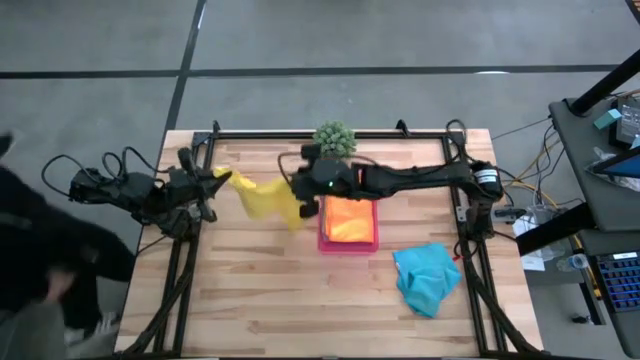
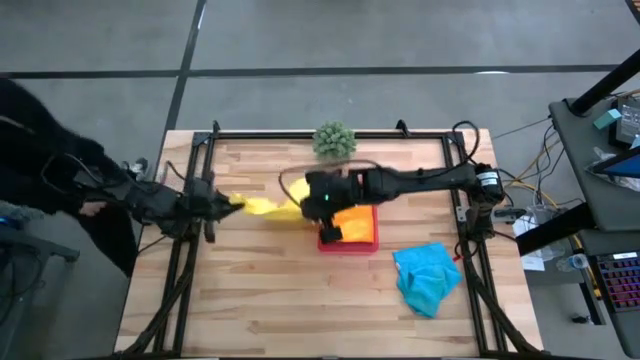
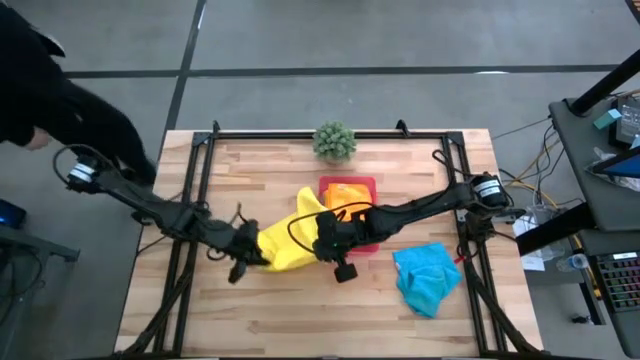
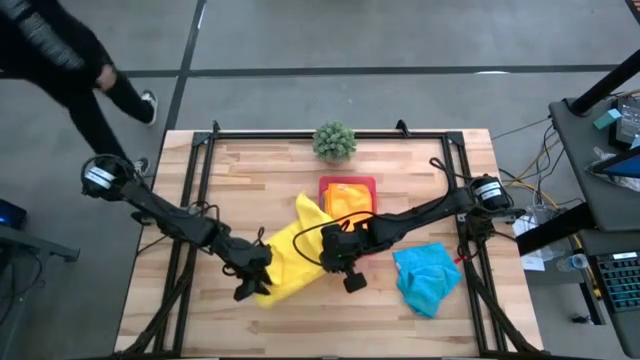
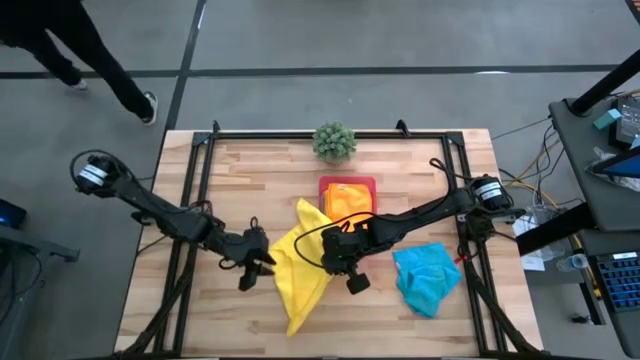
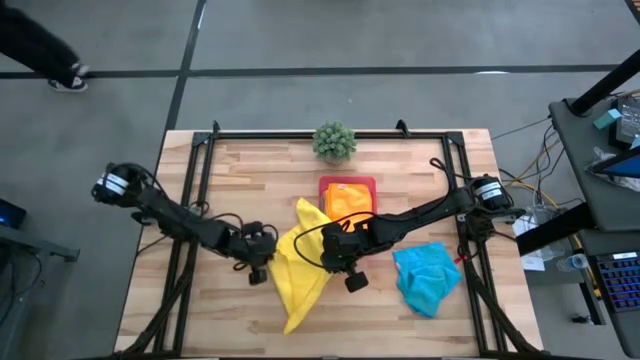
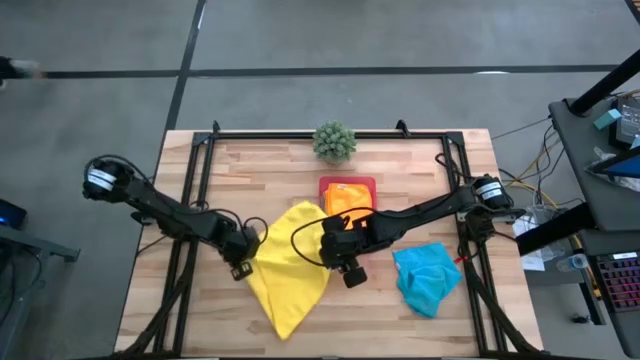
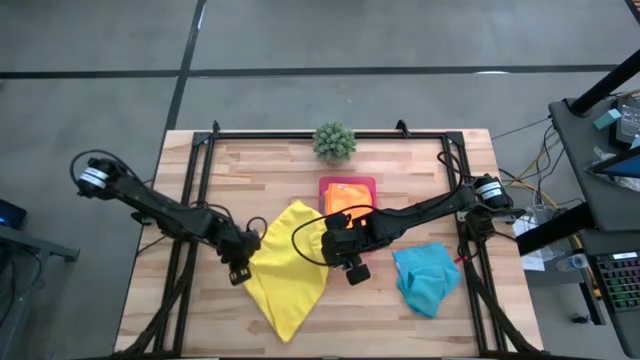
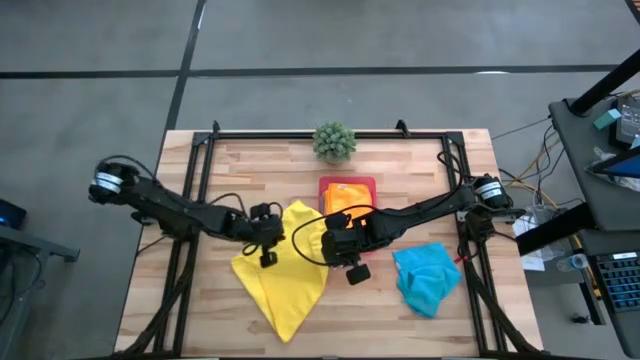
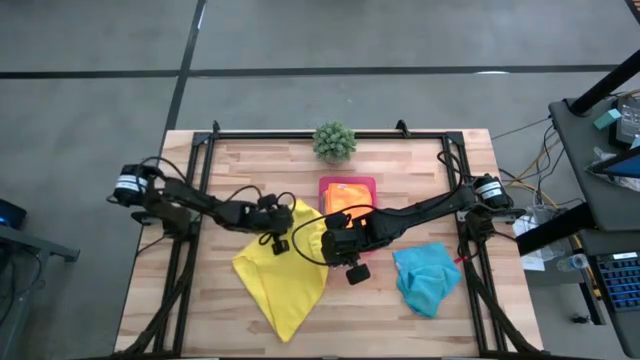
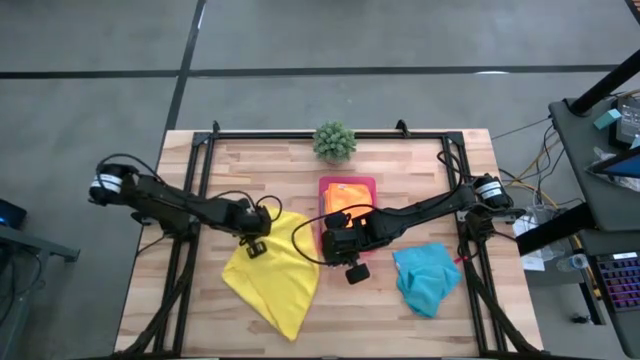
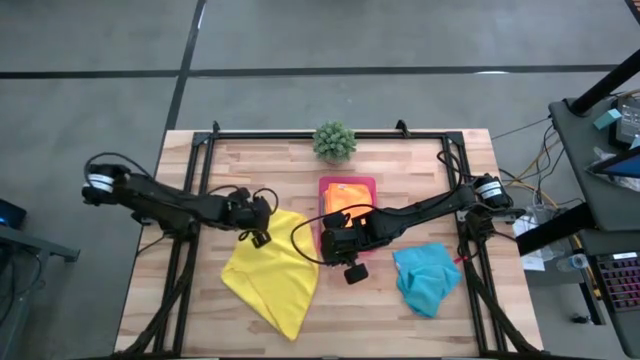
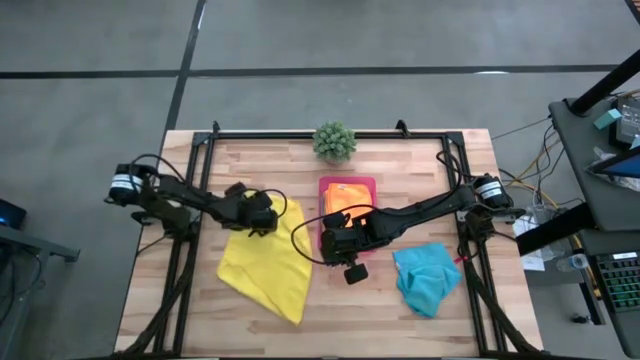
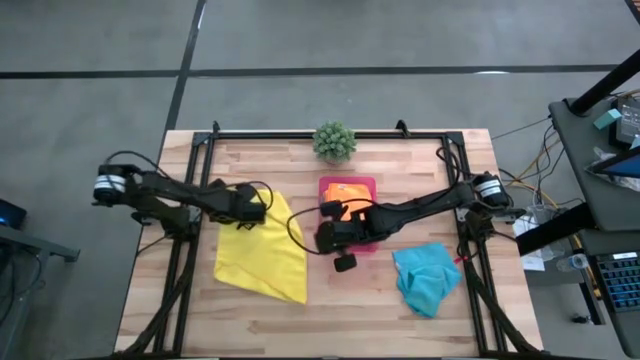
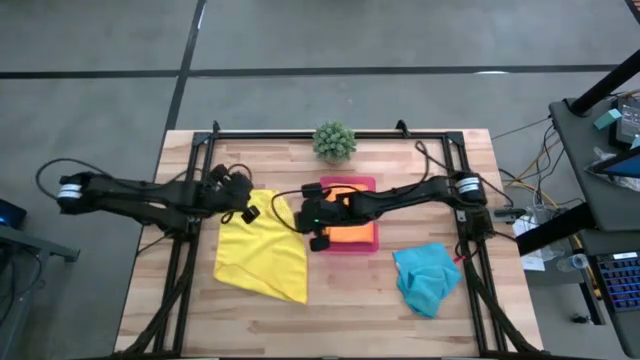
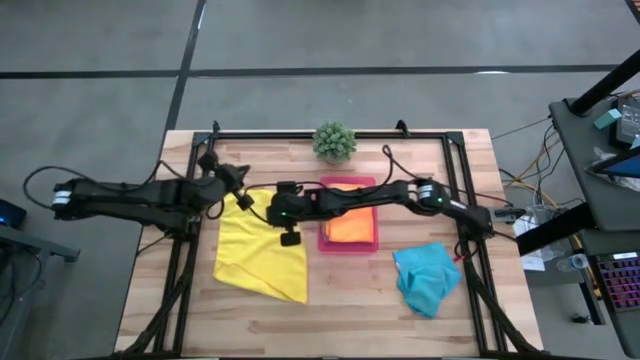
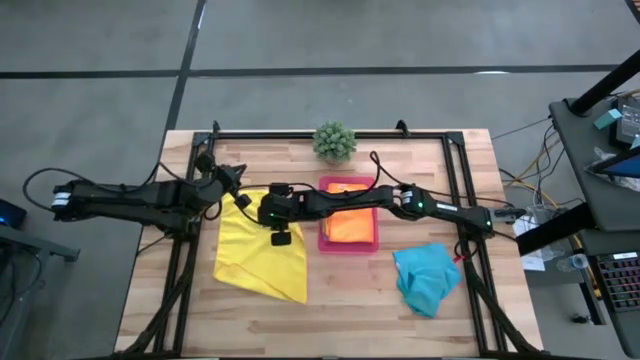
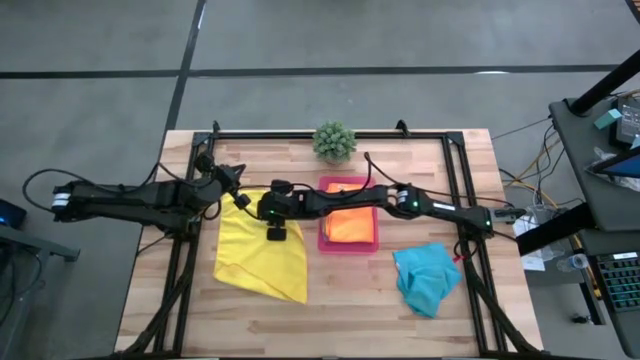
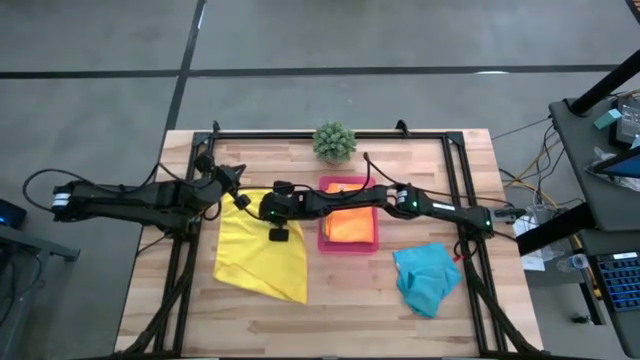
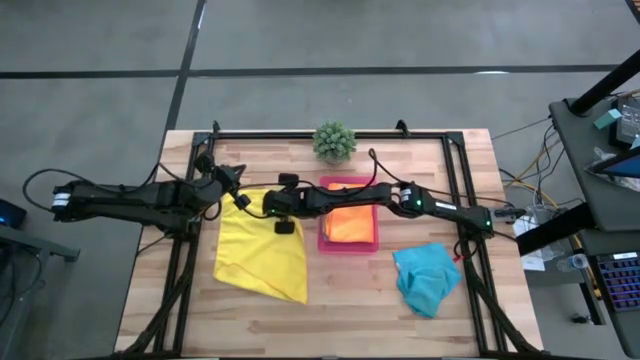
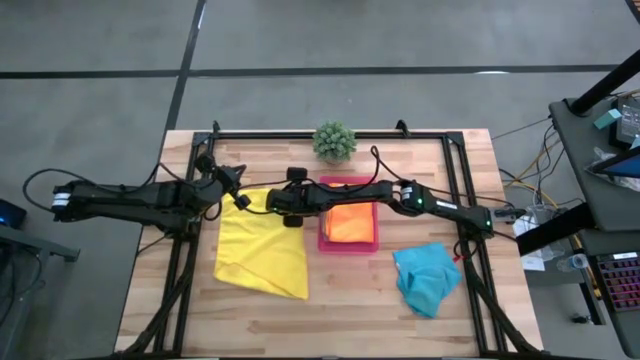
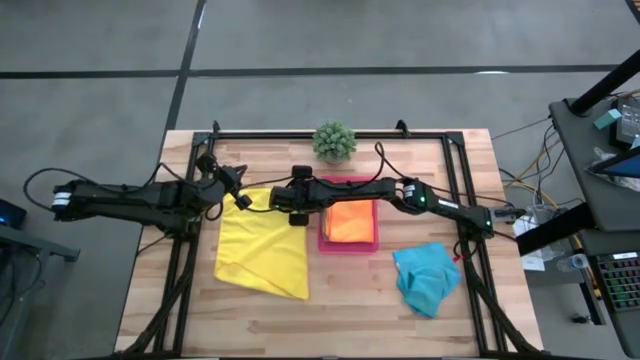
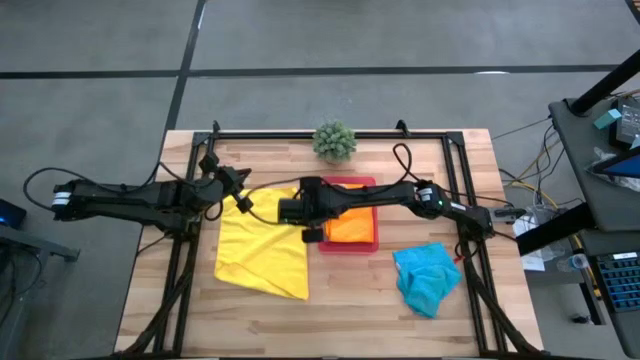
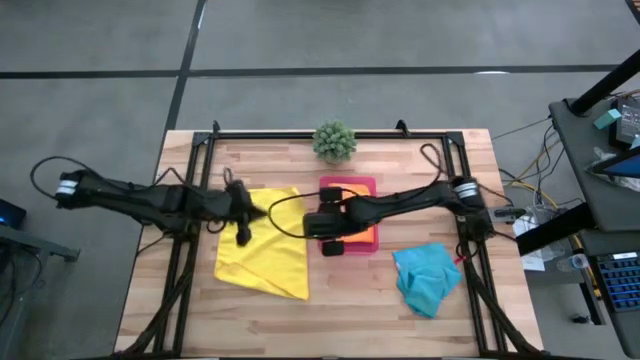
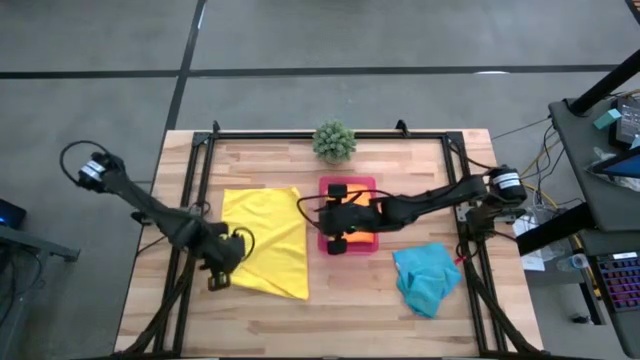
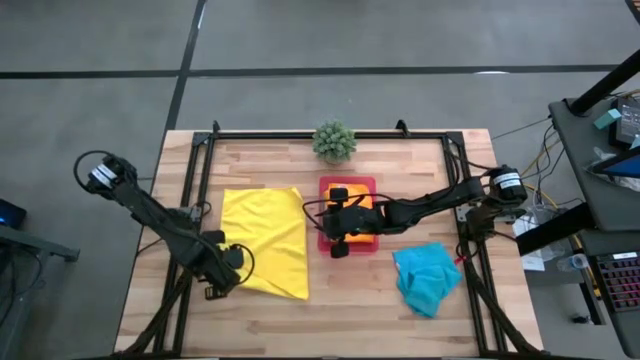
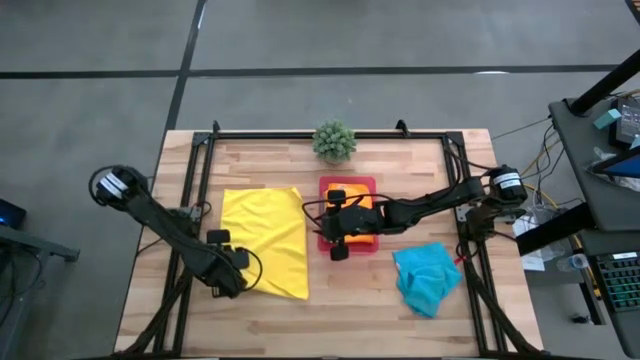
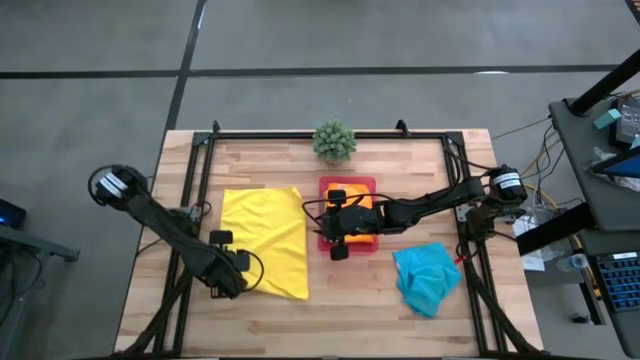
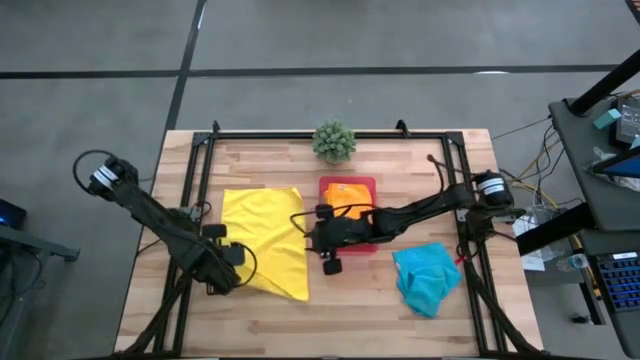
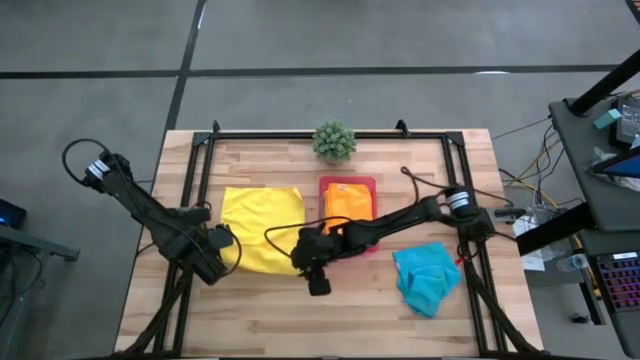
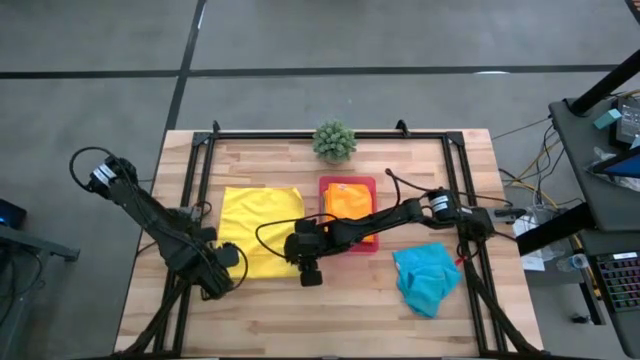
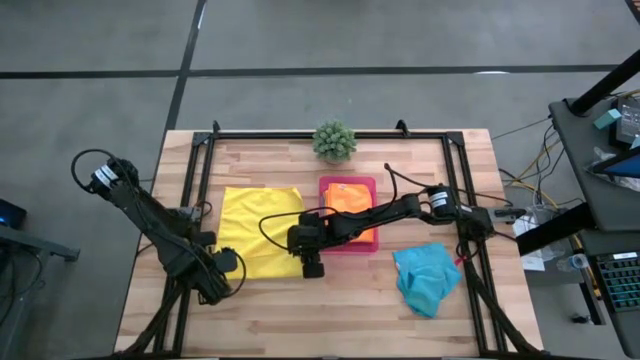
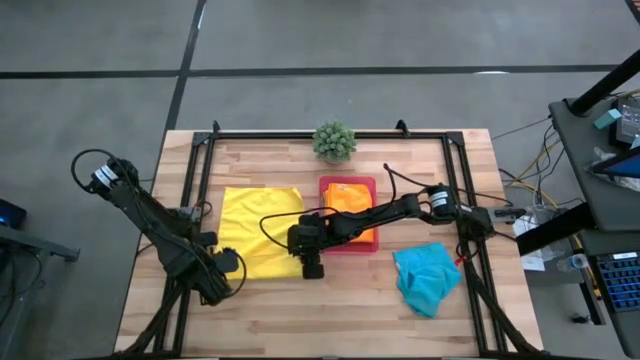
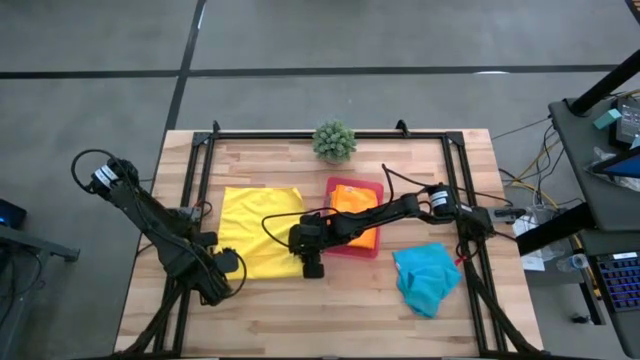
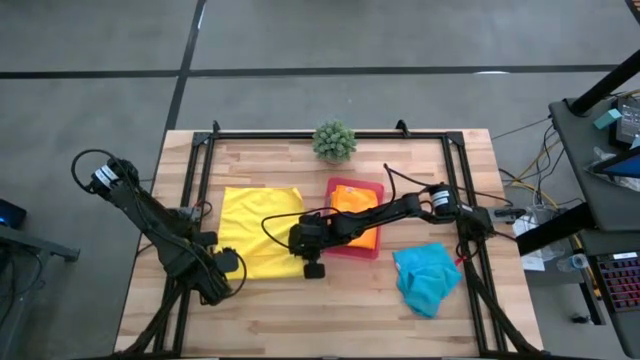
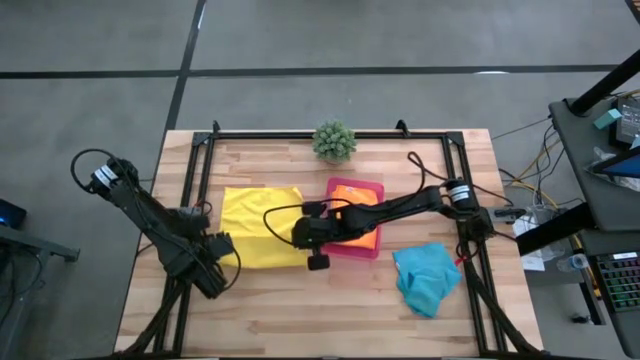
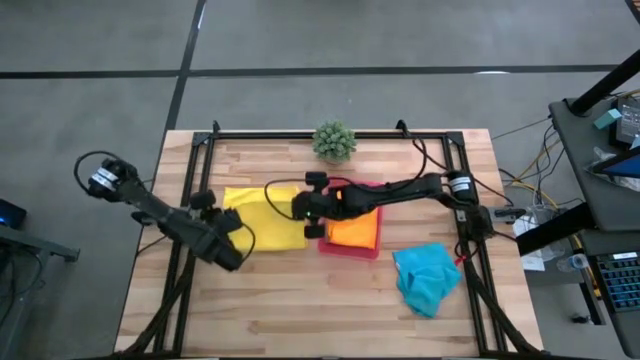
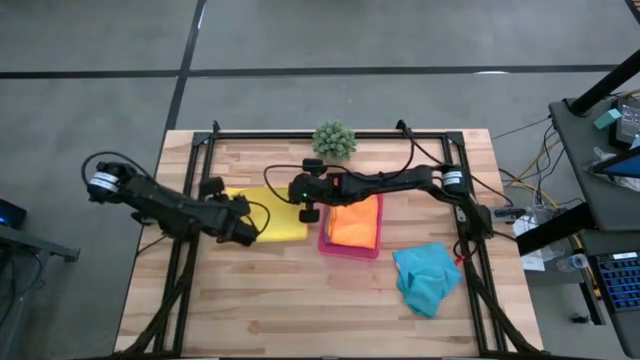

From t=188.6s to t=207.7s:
Task: Fold microfiber towels
Fold the yellow towel

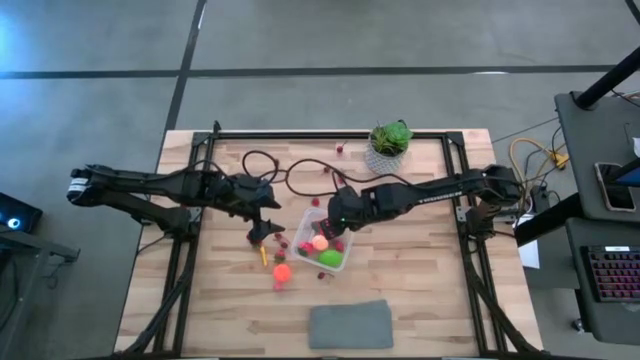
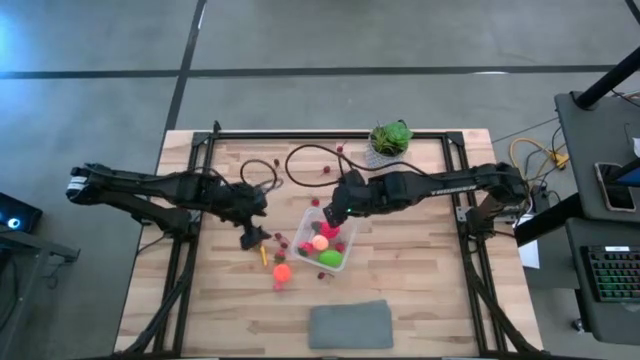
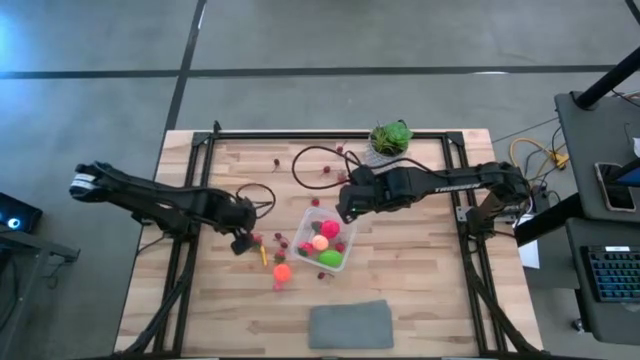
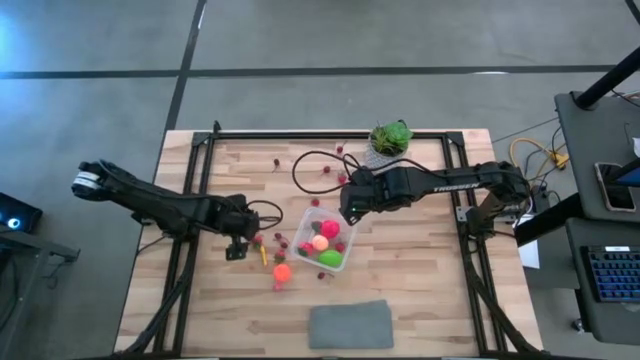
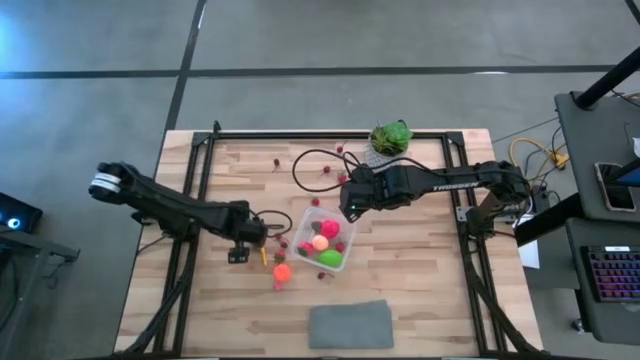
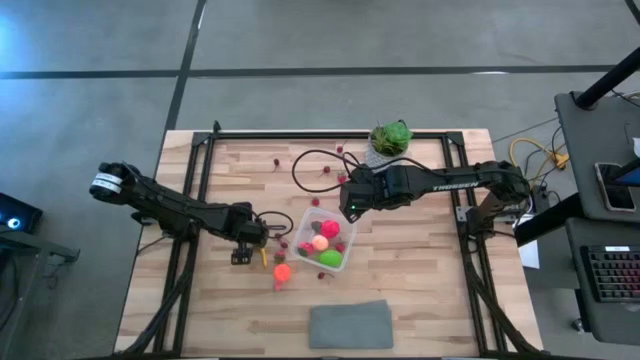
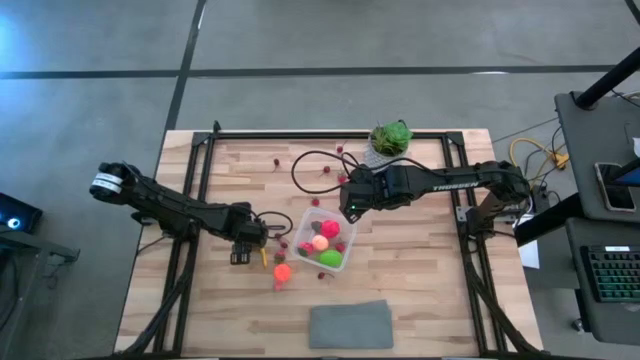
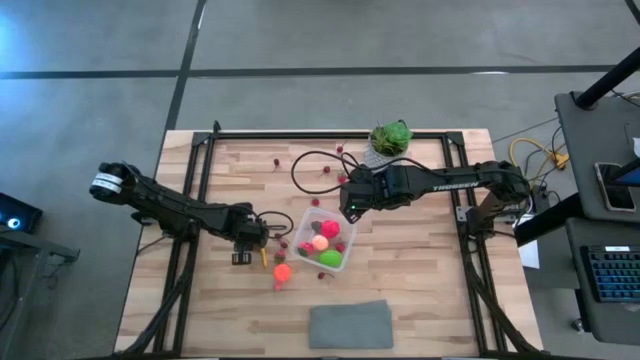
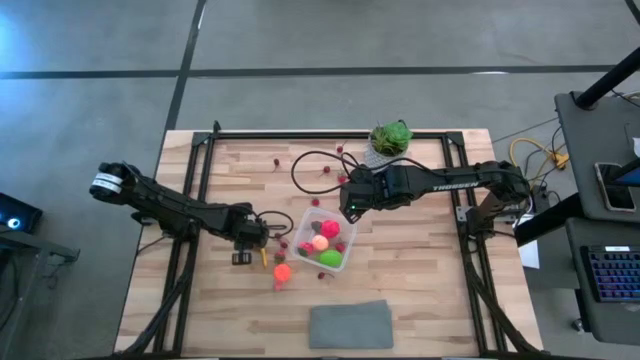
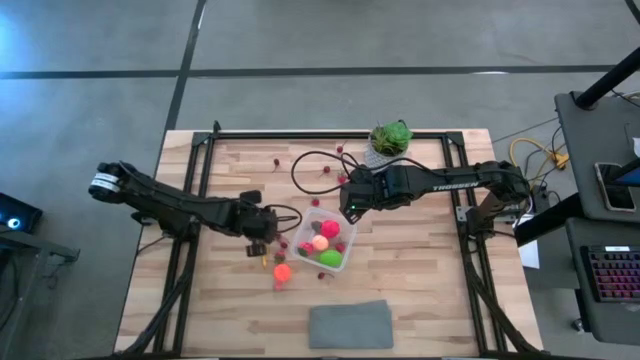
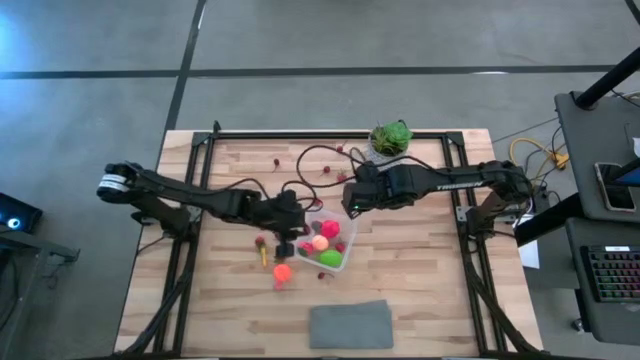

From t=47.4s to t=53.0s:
Task: Pick and placing Produce into tupperware
Put the red cherry into the transparent container
